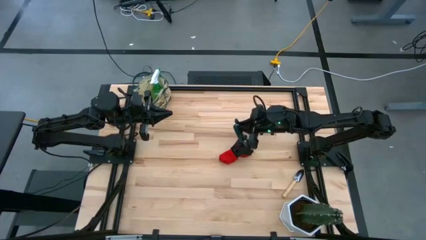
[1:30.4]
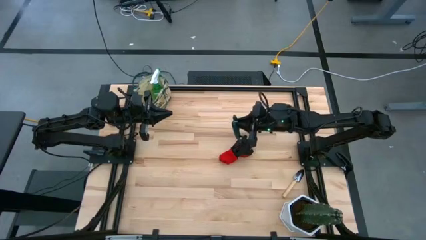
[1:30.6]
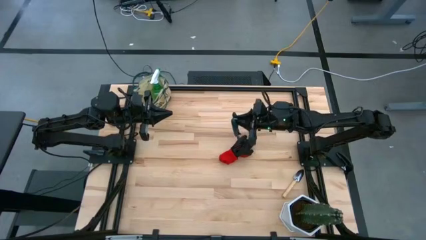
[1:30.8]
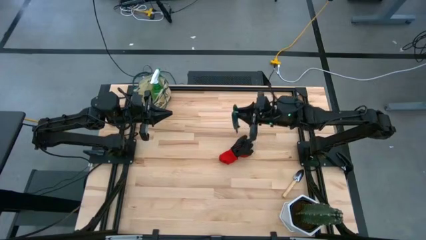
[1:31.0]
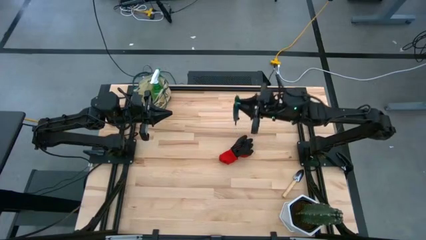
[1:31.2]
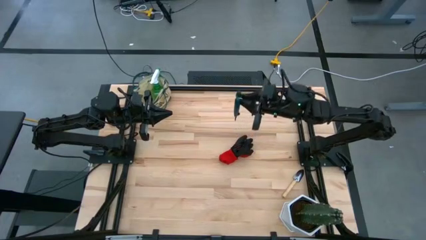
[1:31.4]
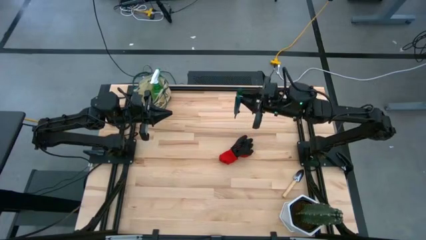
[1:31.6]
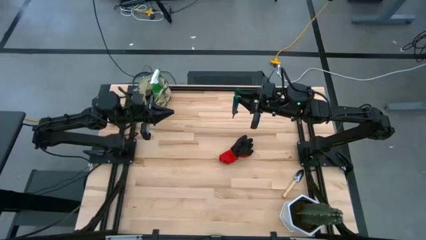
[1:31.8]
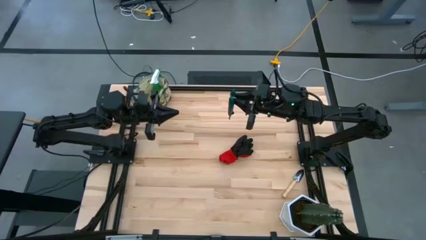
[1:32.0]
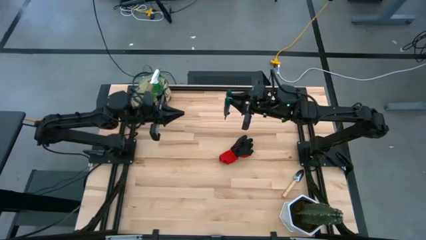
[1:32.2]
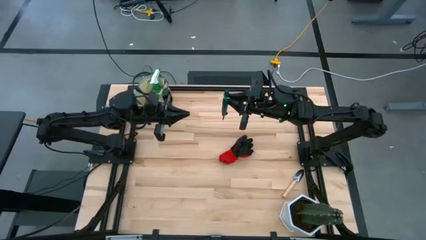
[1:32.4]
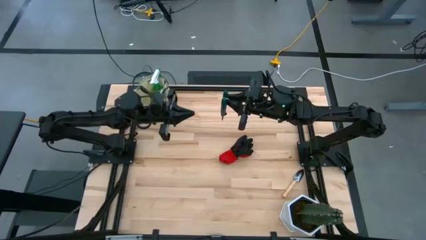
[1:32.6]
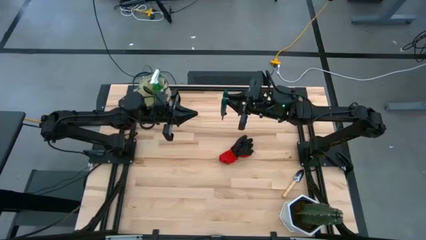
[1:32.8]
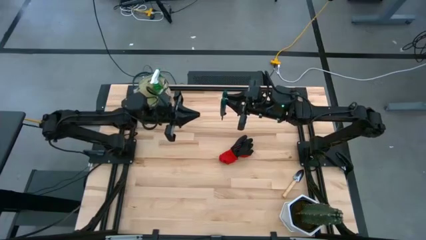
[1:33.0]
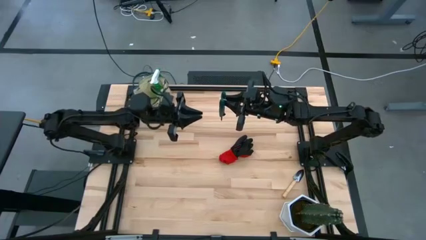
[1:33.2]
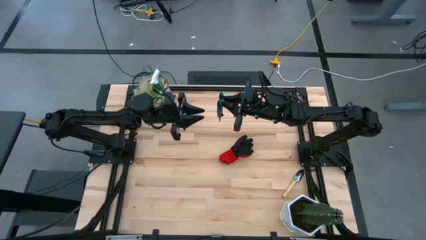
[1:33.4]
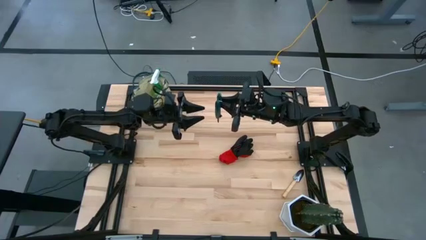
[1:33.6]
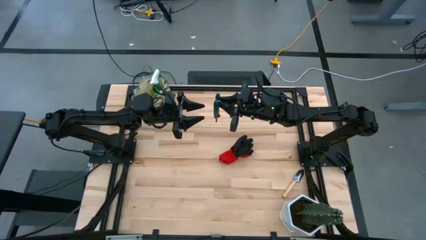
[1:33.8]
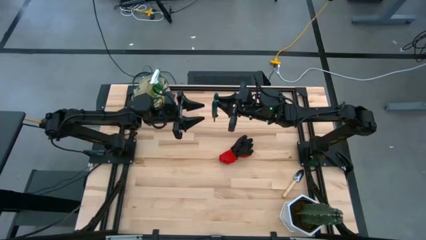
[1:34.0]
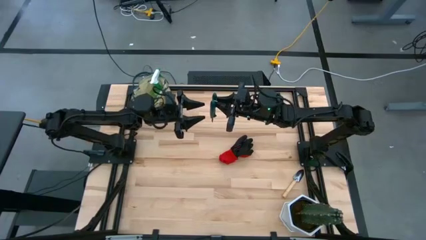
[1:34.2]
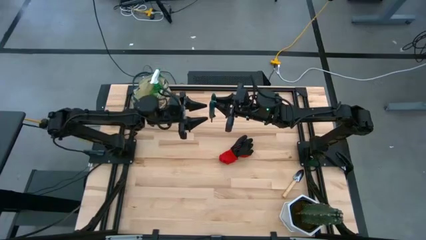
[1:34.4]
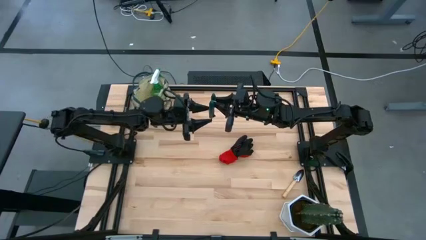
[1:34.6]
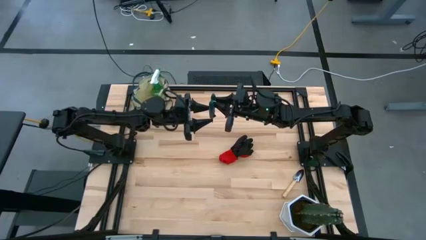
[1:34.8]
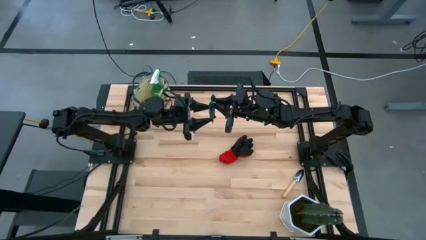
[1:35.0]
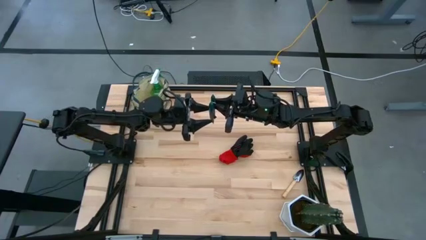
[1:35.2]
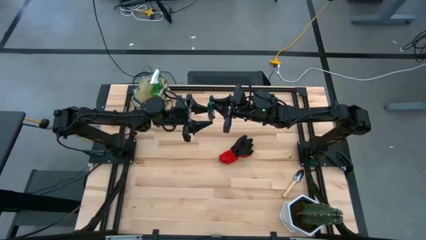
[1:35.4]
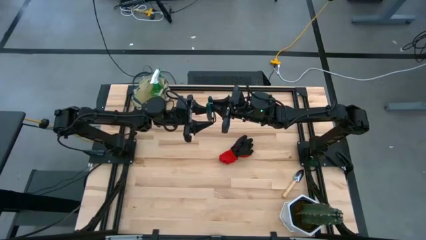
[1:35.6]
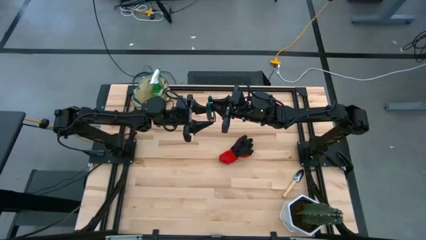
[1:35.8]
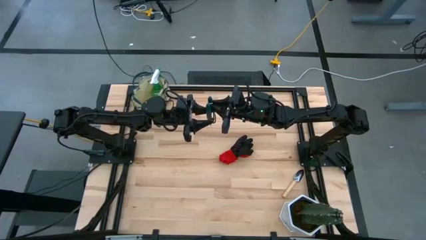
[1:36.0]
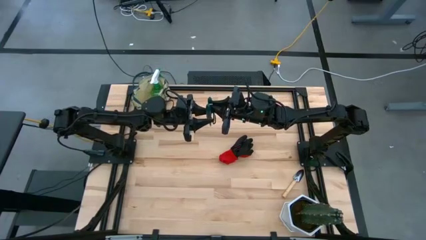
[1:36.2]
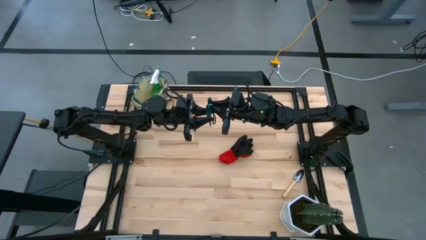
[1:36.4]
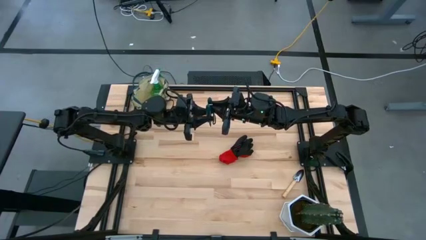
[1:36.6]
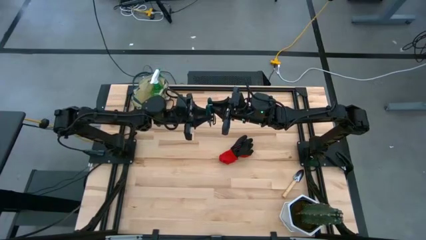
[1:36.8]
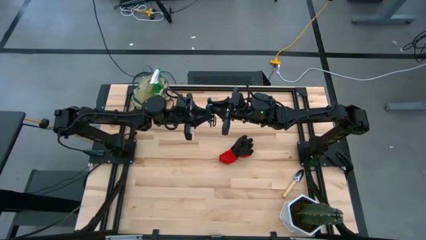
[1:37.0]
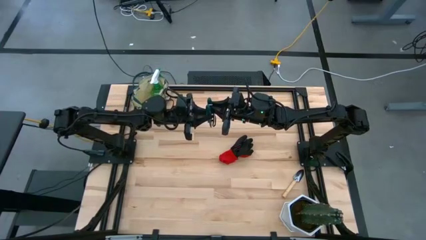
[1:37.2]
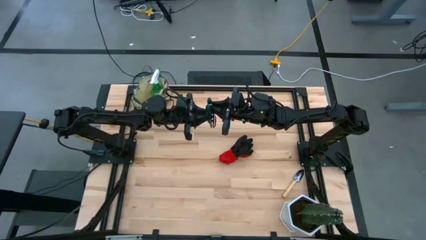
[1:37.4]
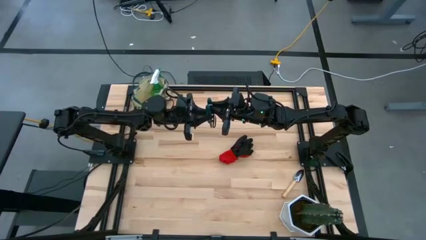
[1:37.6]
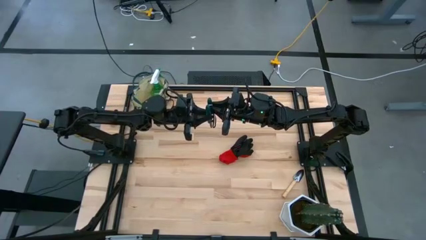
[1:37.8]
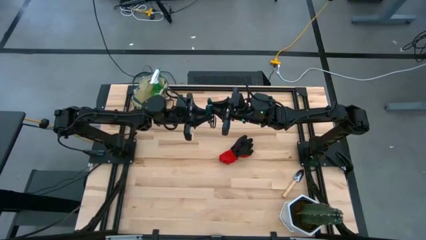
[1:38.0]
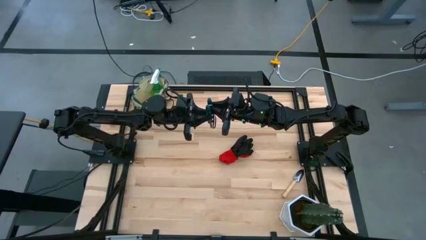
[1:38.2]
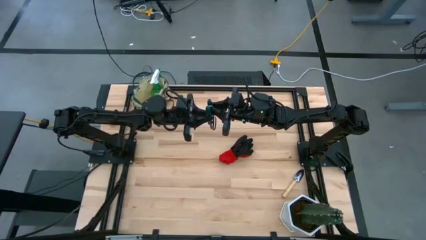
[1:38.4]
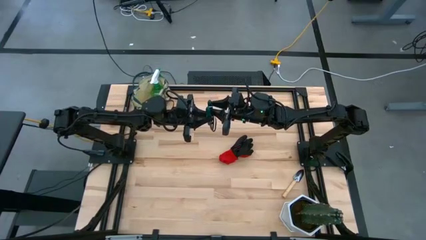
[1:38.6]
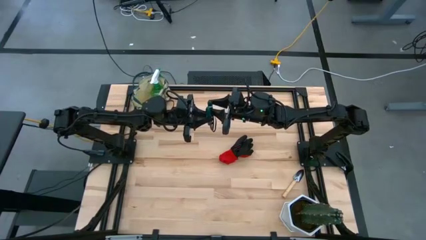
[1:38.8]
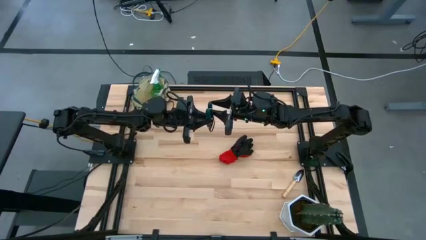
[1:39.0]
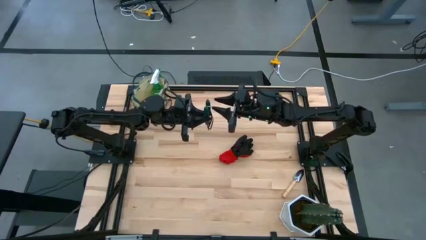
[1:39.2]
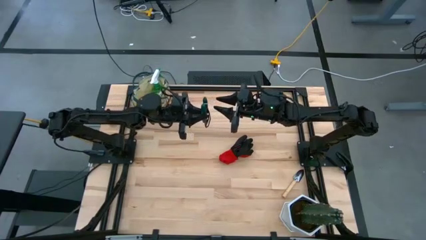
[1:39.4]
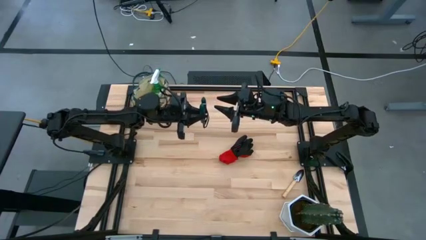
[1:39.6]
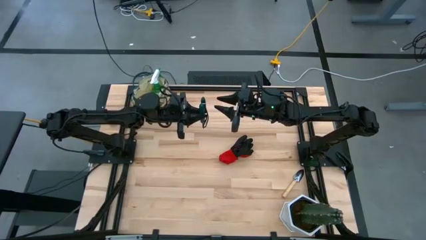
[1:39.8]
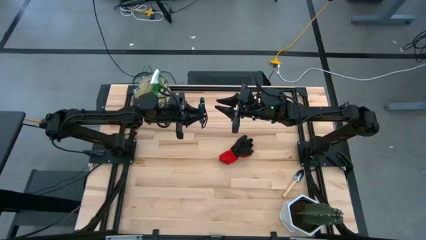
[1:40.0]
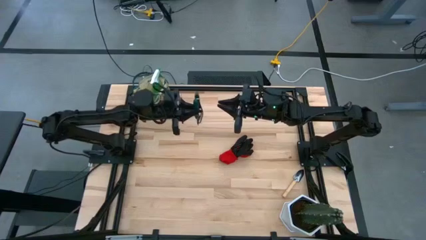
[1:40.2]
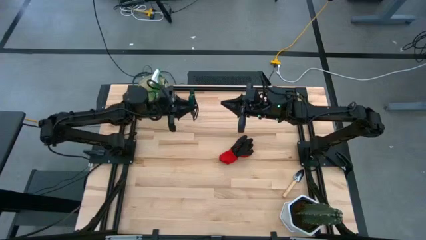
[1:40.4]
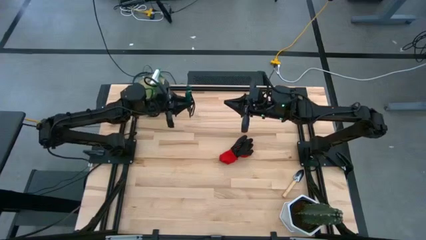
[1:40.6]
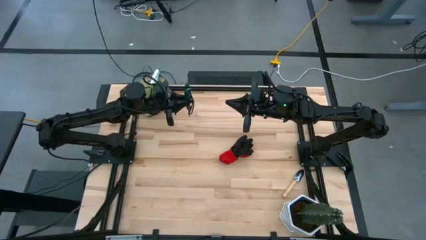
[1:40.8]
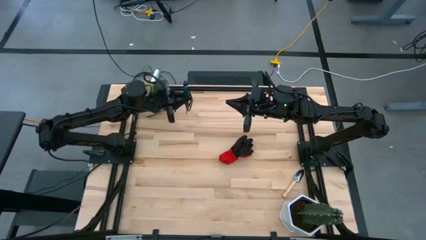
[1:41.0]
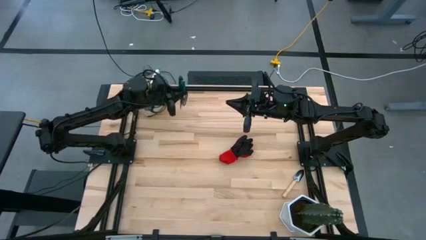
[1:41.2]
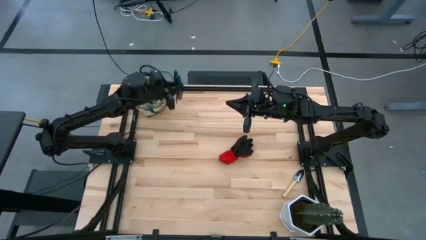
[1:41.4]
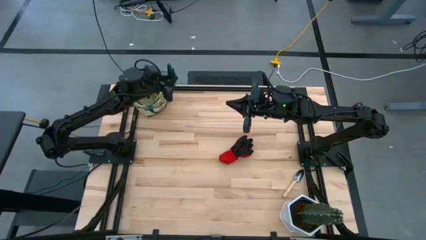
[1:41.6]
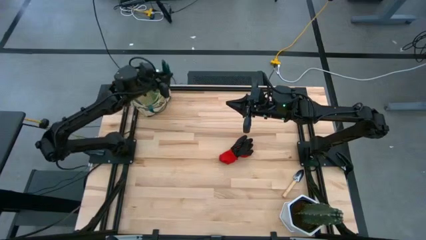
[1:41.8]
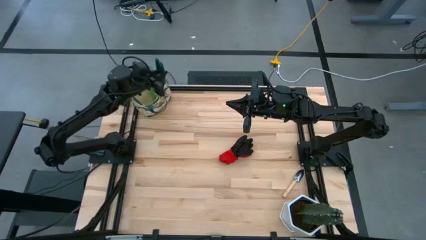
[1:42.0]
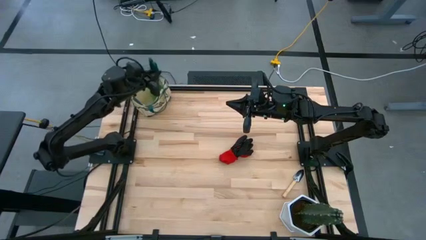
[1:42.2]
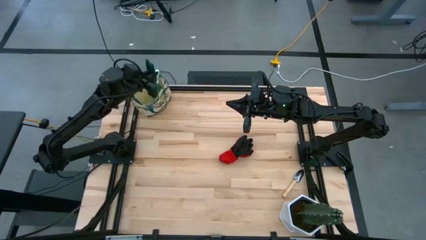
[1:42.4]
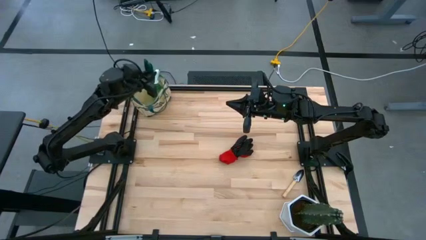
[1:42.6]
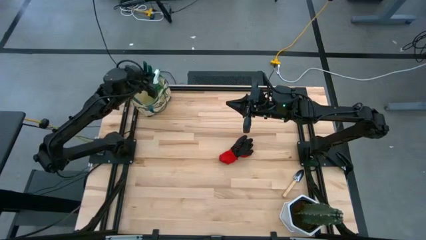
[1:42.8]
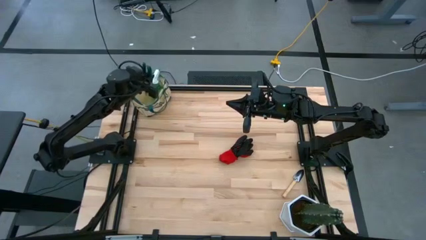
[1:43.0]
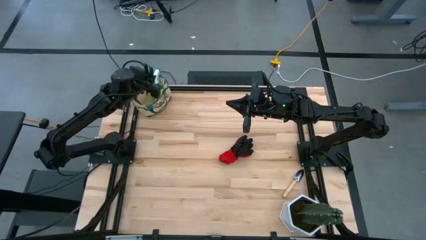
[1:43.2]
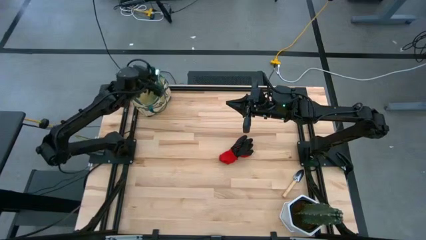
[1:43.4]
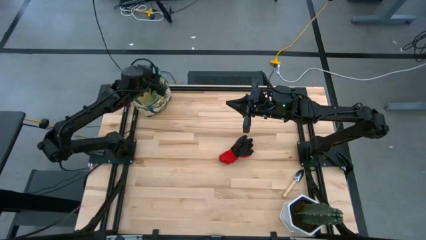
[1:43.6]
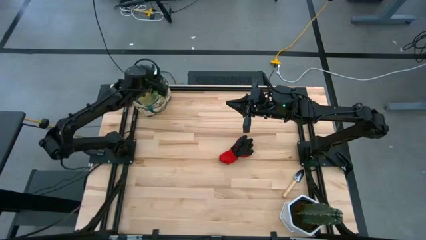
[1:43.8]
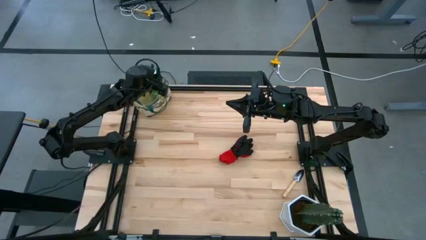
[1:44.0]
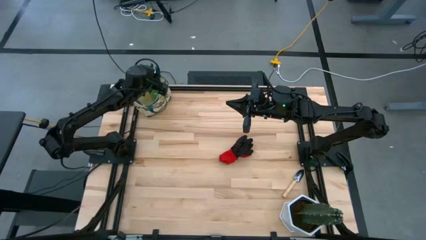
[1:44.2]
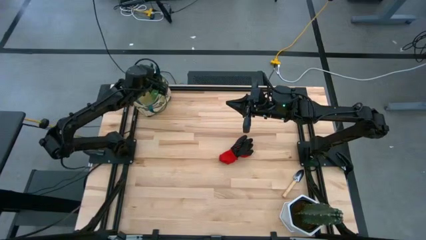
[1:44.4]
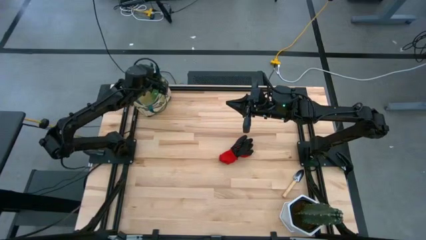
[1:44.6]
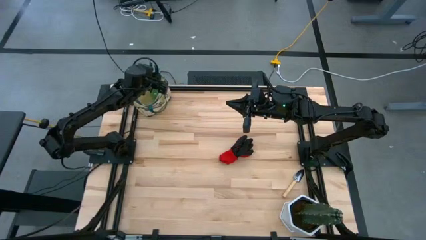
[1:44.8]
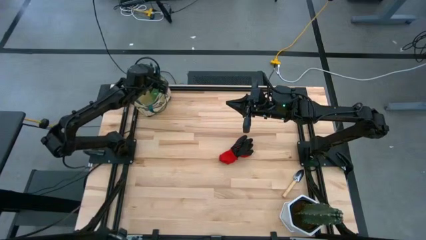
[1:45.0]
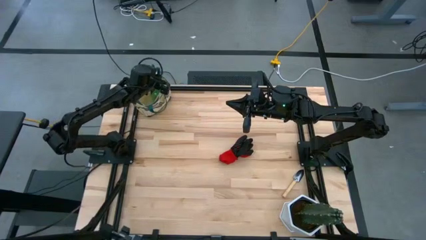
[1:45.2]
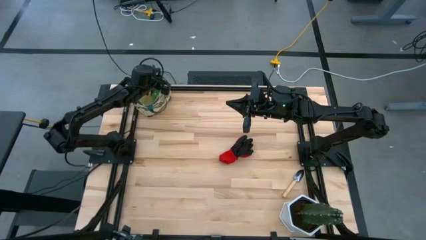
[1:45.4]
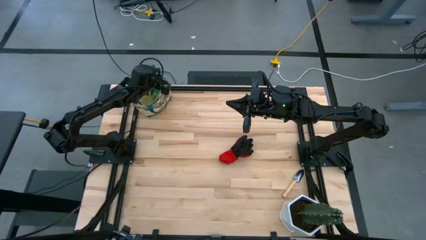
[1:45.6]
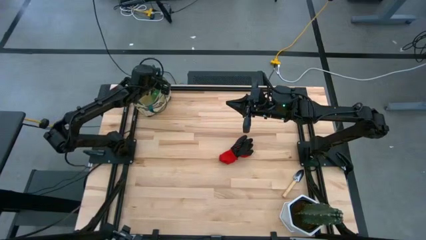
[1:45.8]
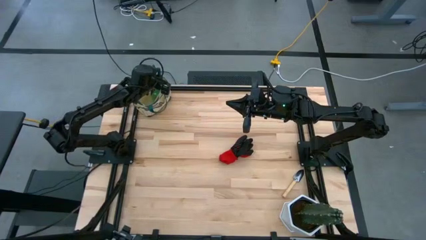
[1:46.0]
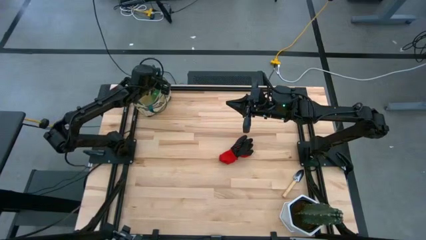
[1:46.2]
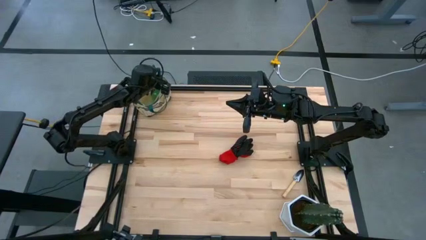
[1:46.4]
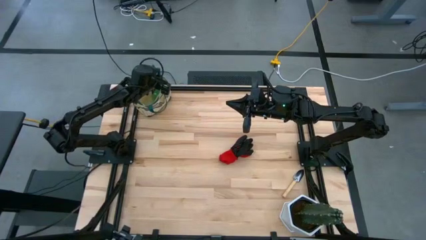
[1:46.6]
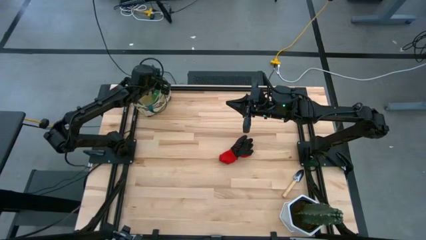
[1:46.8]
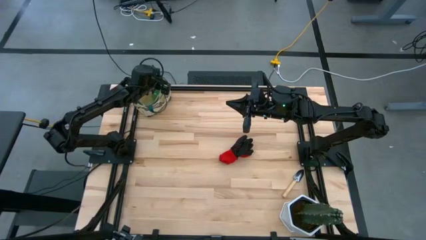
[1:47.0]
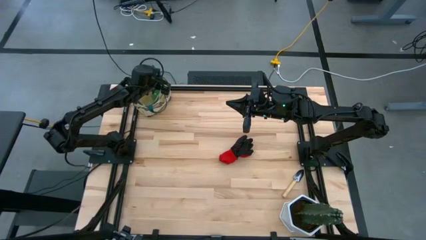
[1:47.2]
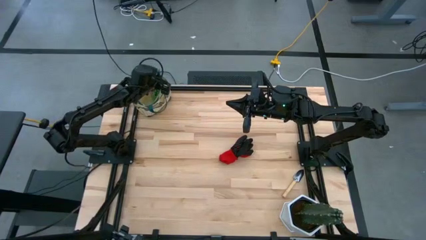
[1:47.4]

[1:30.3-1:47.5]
Task: Pick & Place Garden tools in Gardening bag
Put the shear scissors into the gardening bag
